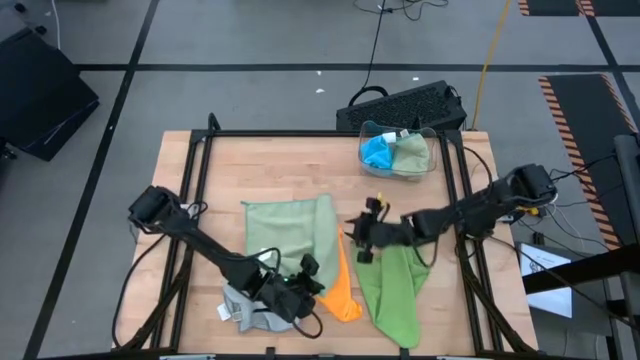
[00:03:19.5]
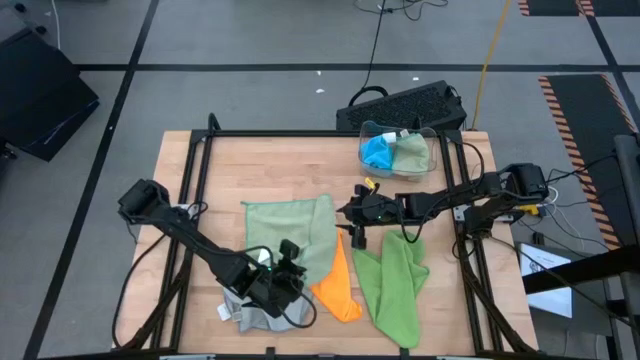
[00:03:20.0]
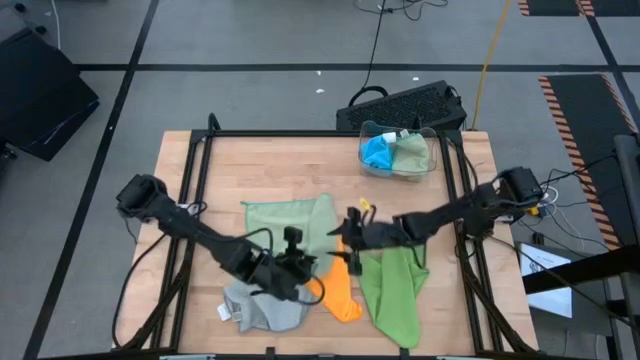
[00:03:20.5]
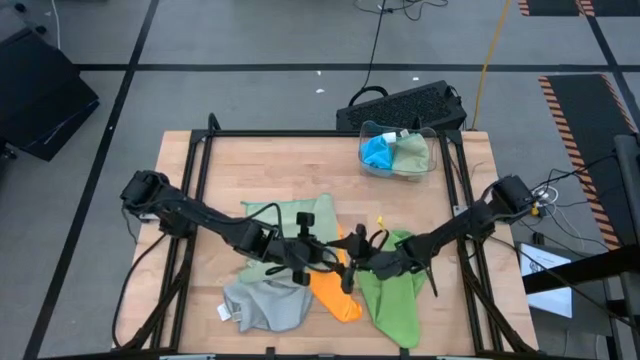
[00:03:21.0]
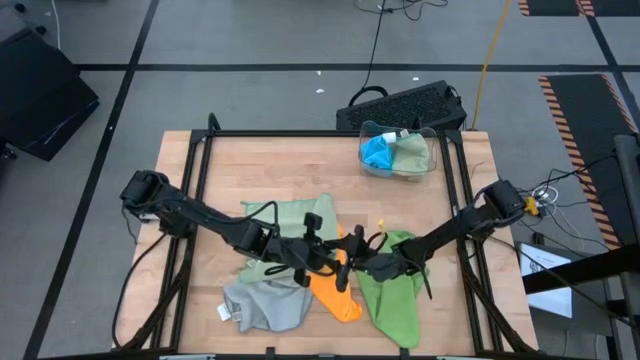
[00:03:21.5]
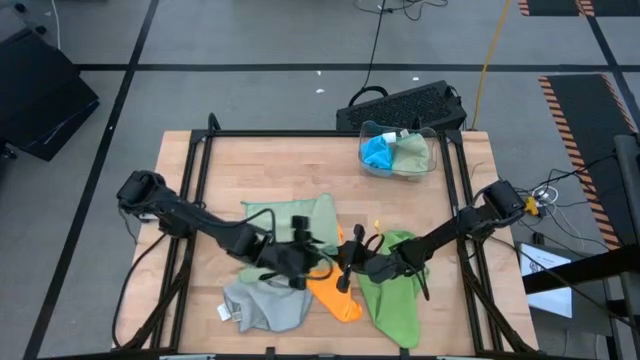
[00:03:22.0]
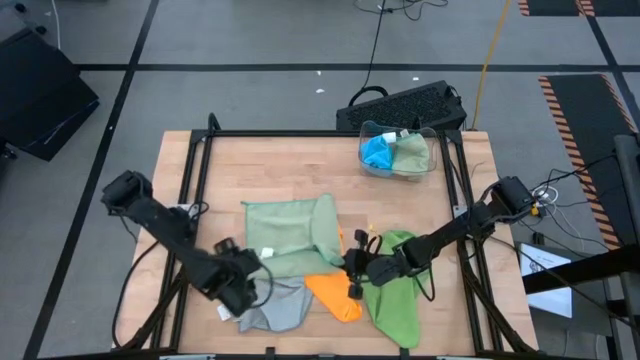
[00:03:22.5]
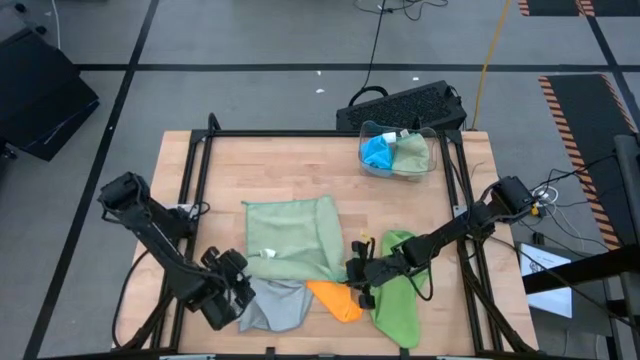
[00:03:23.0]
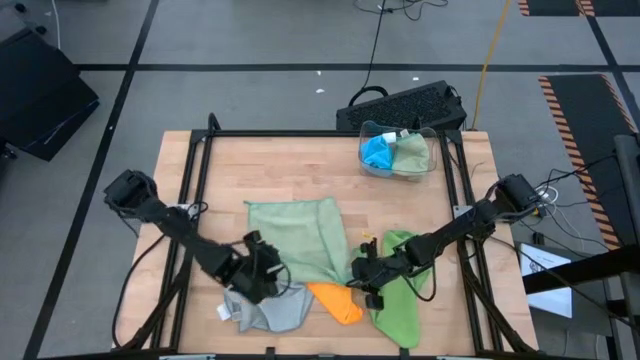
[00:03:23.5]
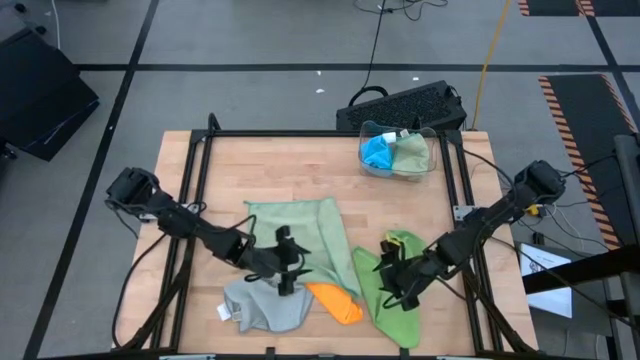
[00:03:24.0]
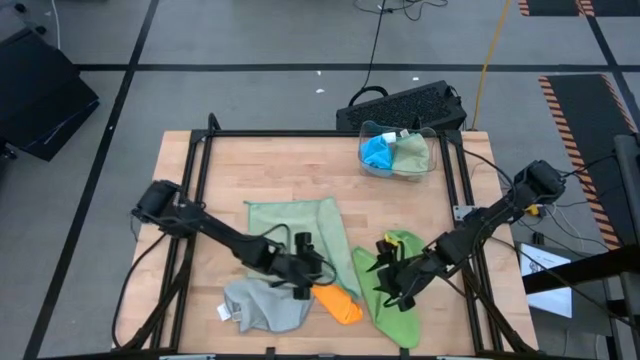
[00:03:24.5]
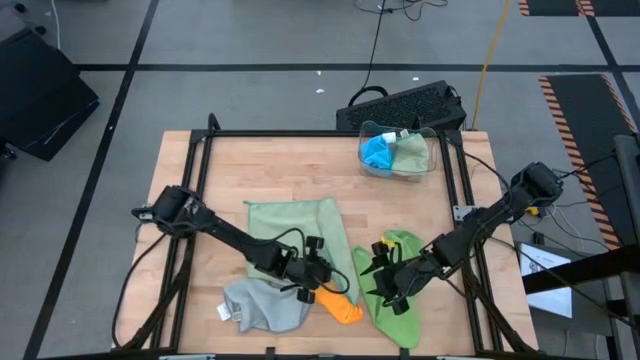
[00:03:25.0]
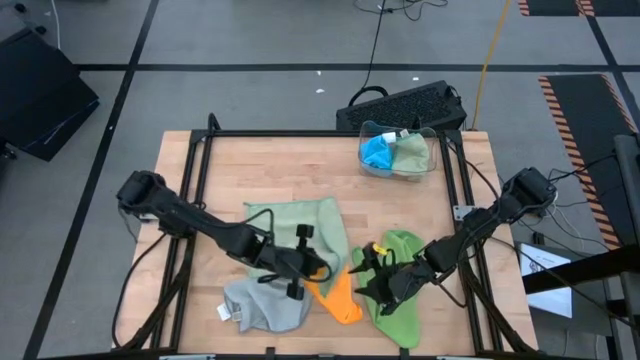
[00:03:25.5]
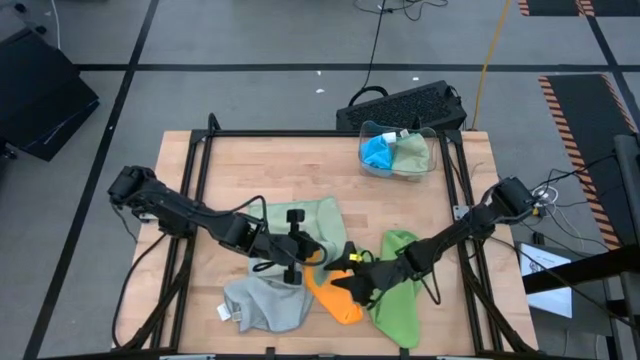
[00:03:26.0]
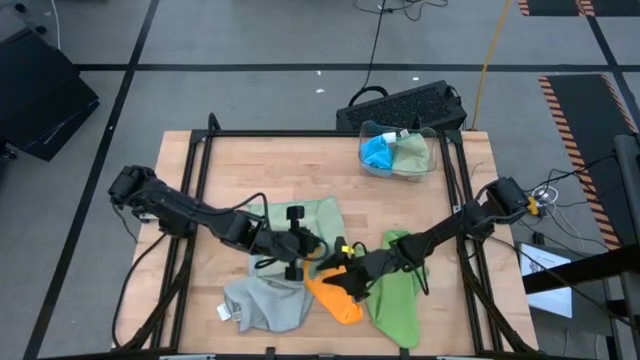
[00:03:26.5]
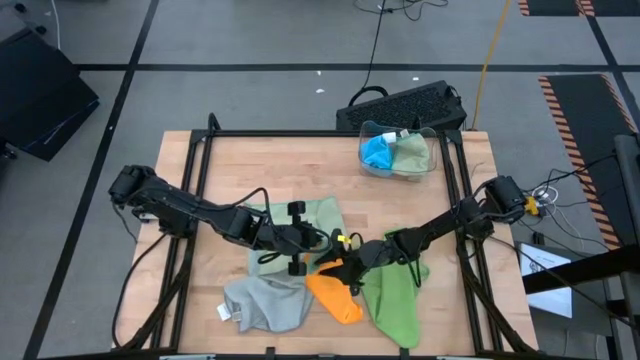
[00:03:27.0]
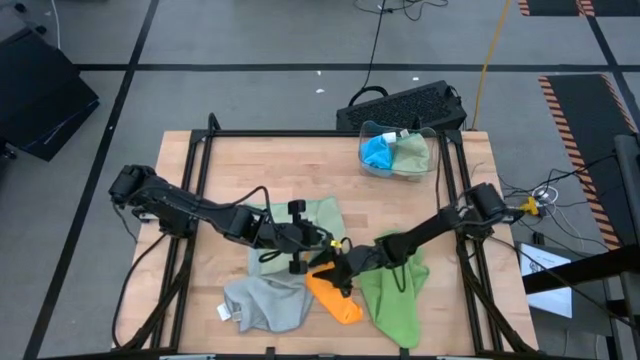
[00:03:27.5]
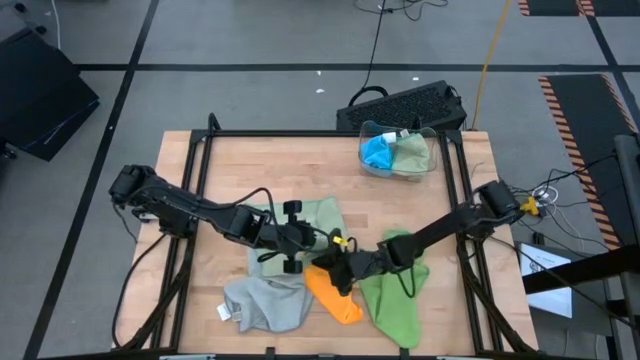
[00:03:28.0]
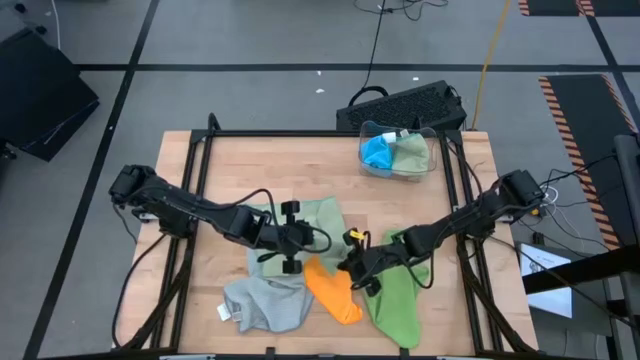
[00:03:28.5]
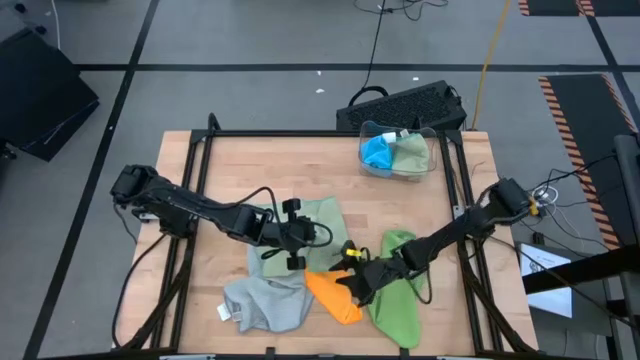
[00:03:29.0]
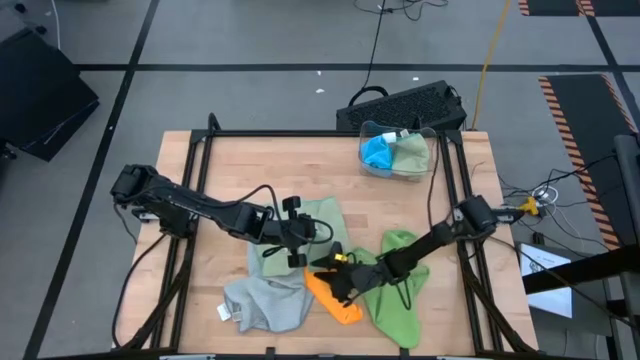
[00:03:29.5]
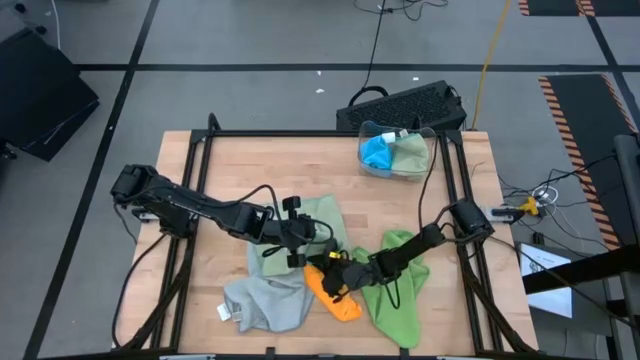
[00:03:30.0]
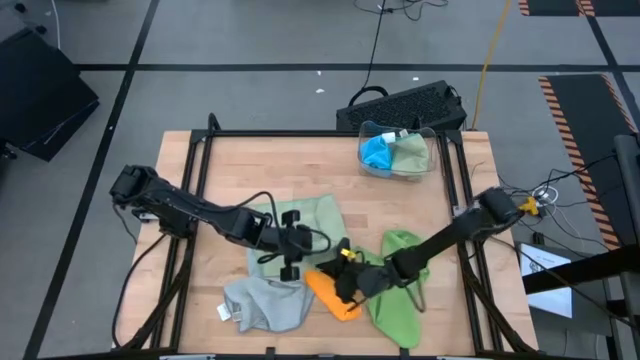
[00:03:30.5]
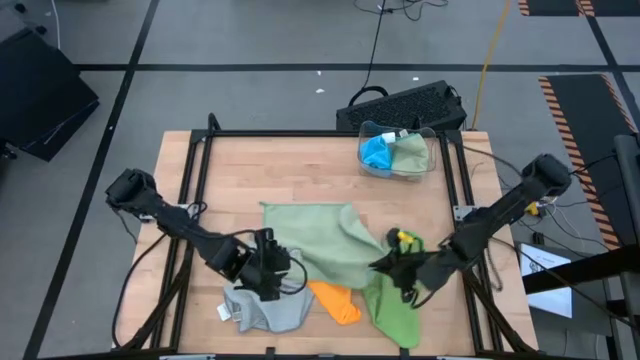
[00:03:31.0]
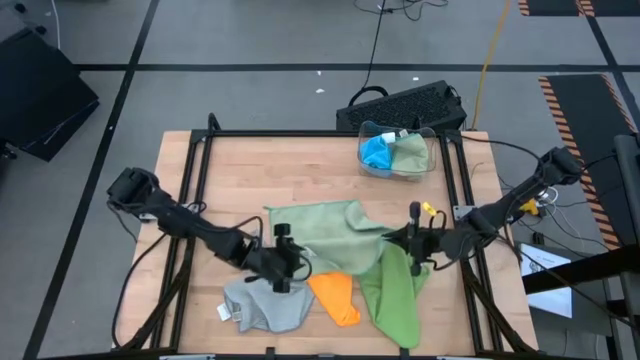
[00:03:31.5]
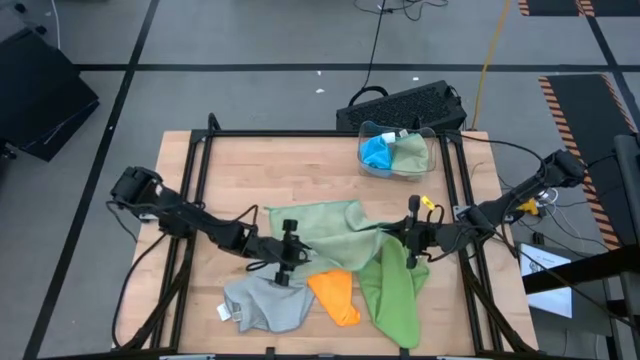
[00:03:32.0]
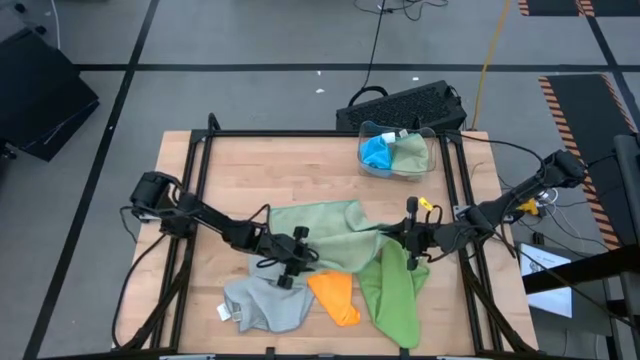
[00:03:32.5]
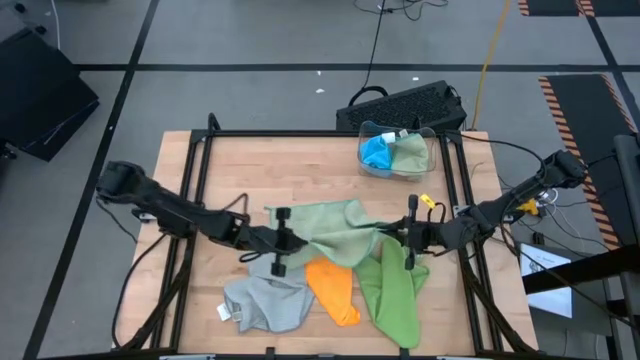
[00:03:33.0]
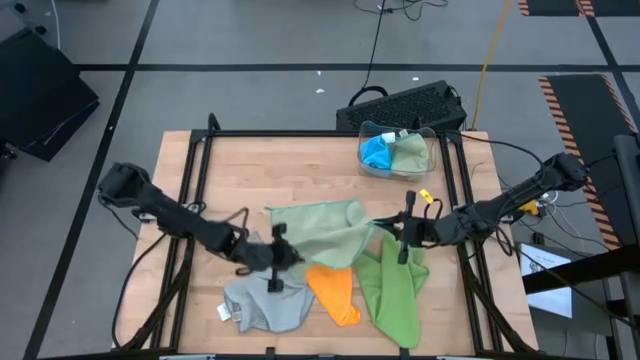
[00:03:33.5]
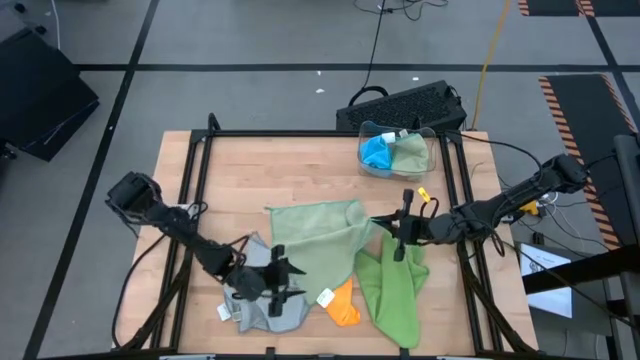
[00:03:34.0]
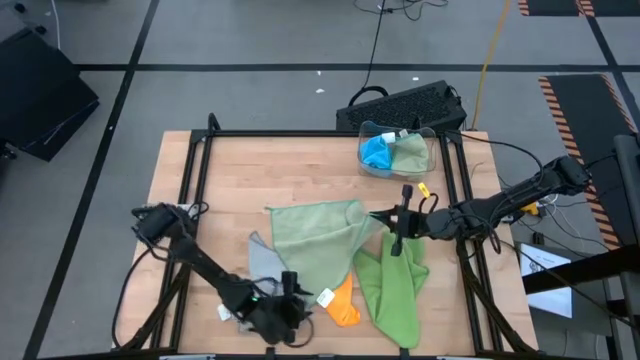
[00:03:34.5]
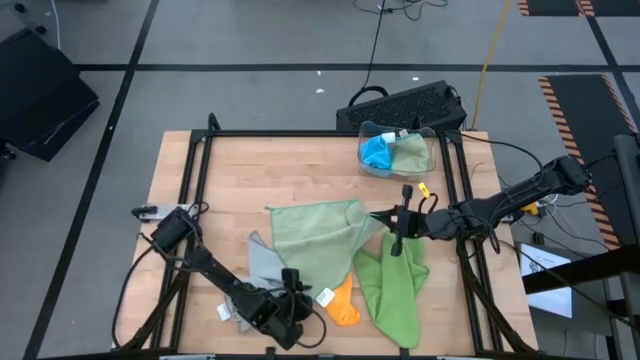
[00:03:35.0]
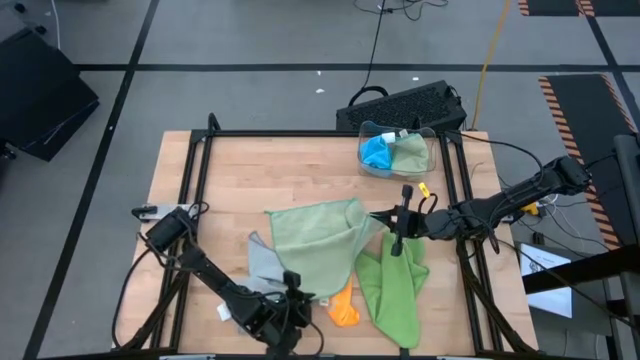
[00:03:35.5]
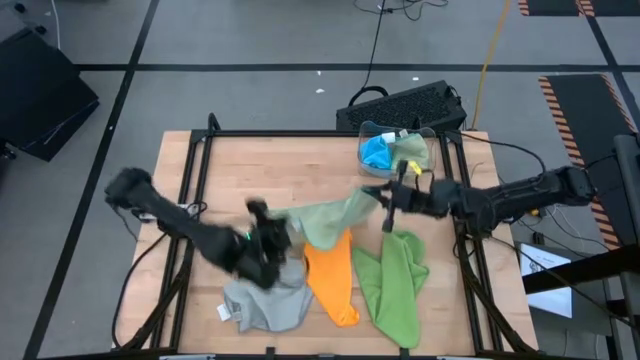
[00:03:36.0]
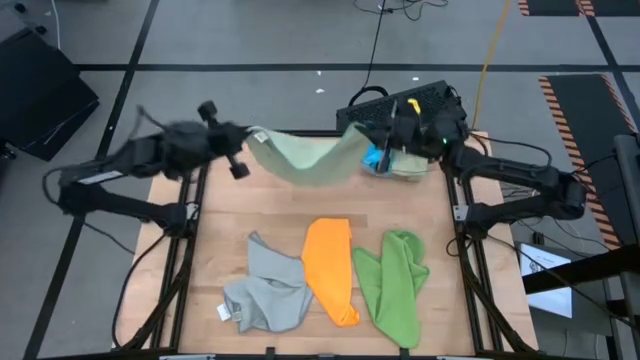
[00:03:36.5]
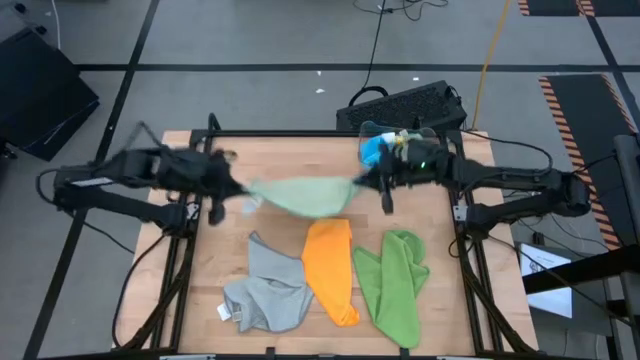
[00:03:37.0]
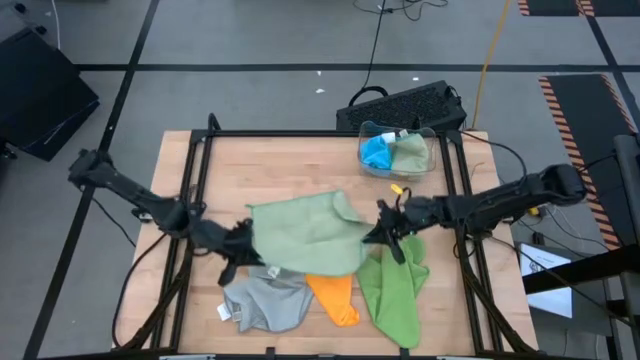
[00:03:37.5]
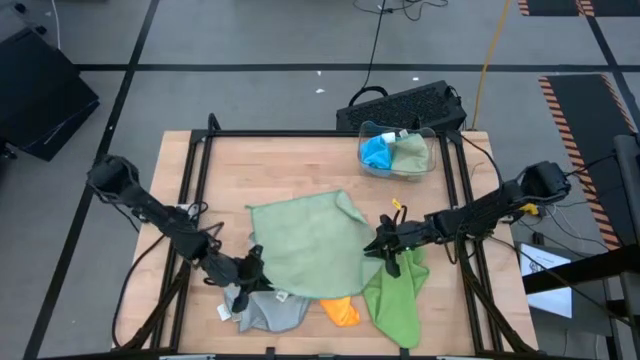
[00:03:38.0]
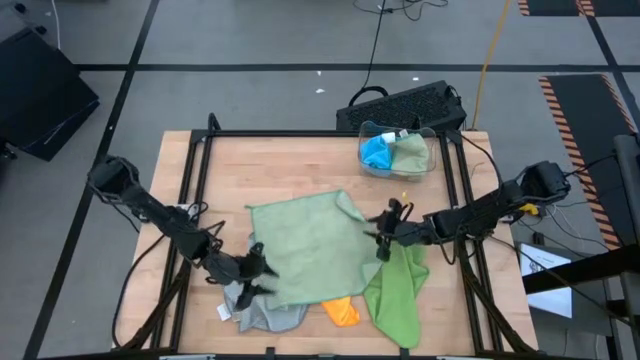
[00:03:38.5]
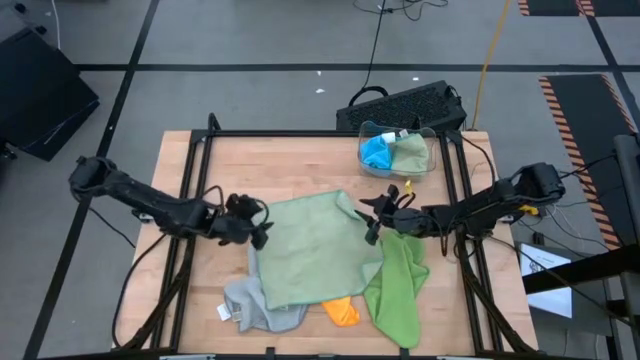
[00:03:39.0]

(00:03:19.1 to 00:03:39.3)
Task: Fold microfiber towels
Fold the light green microfiber towel
